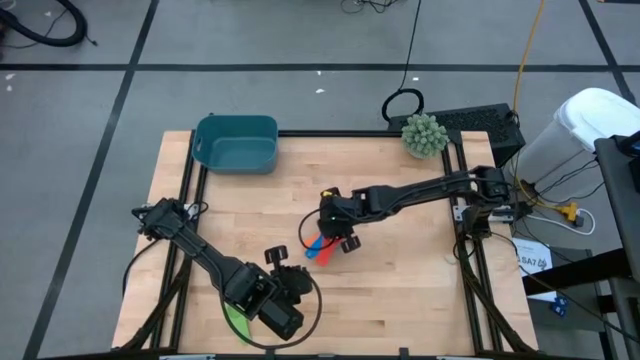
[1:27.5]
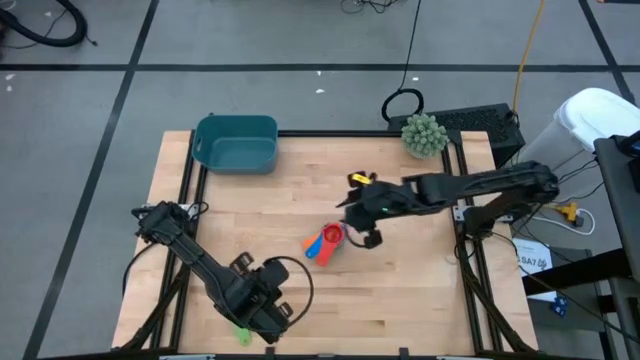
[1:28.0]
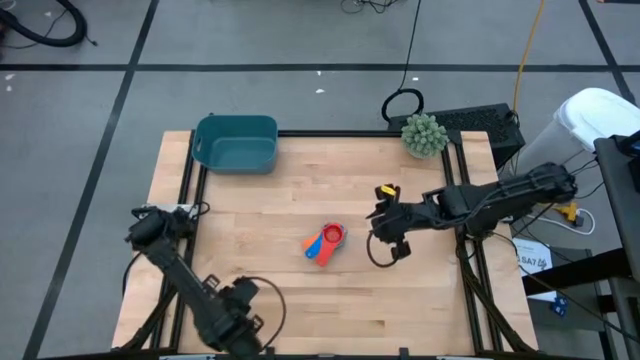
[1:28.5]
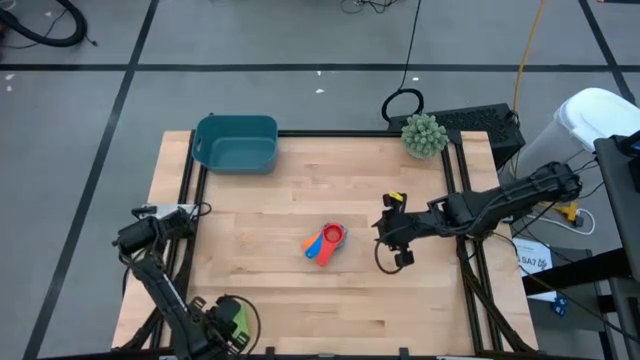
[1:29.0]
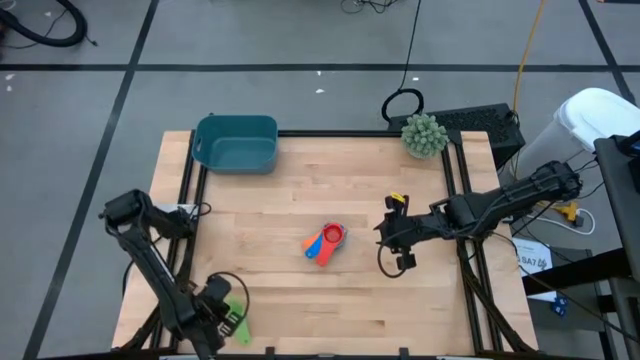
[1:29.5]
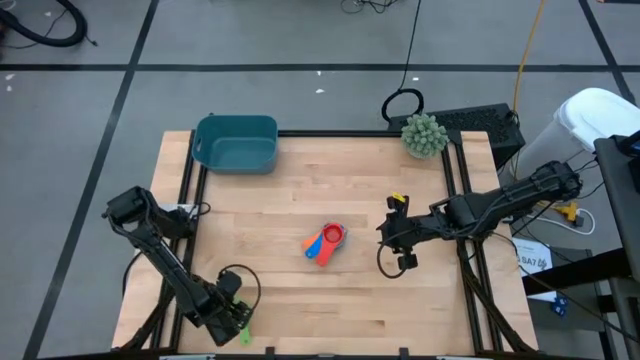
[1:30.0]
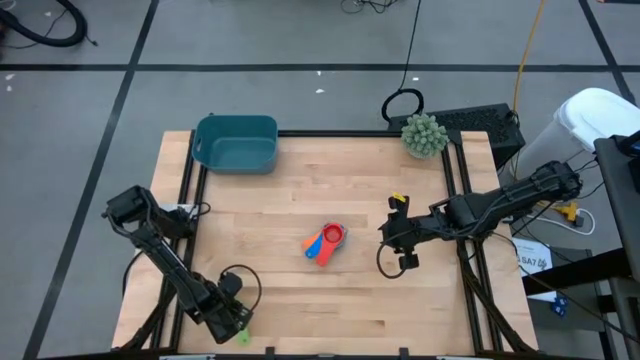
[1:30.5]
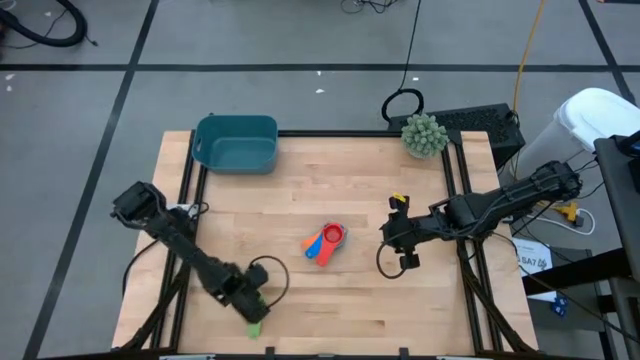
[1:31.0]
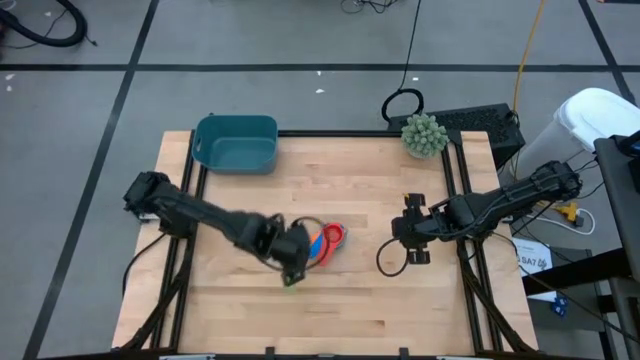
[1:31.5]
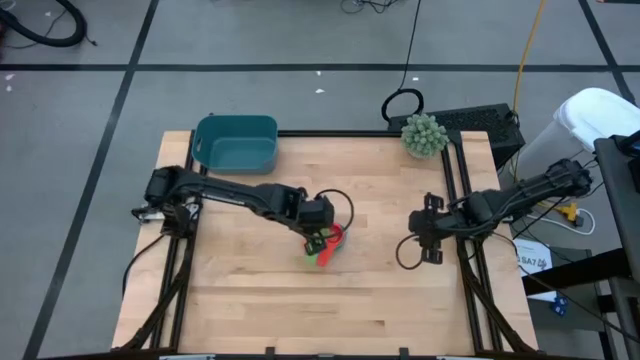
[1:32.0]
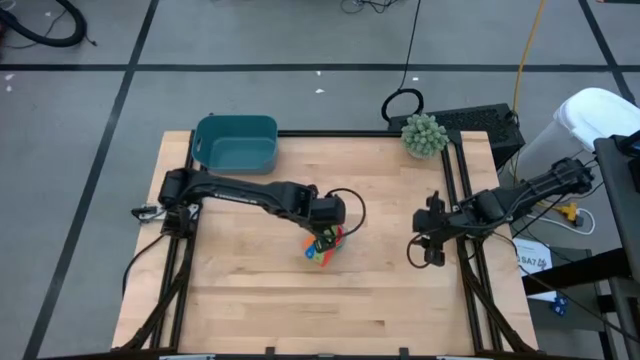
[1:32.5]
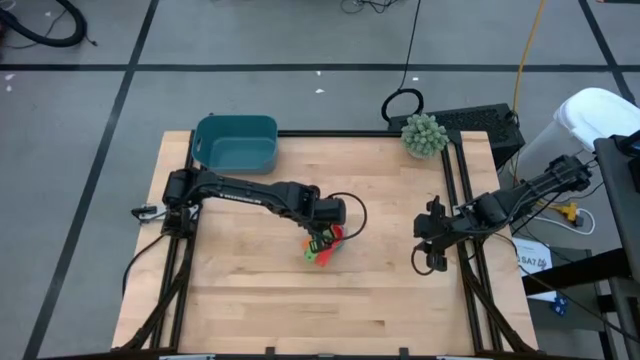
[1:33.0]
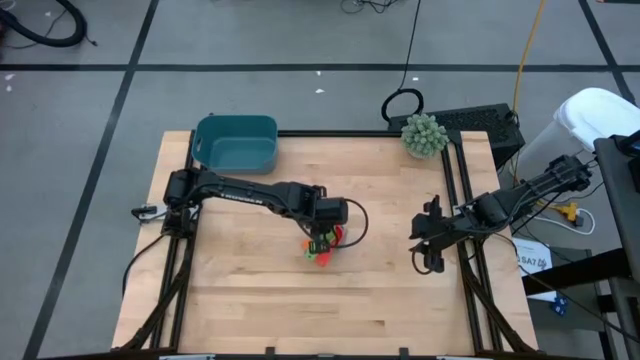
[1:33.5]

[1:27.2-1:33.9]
Task: Nest measuring cups in basket
Stack the green measuring cup on top of the red measuring cup

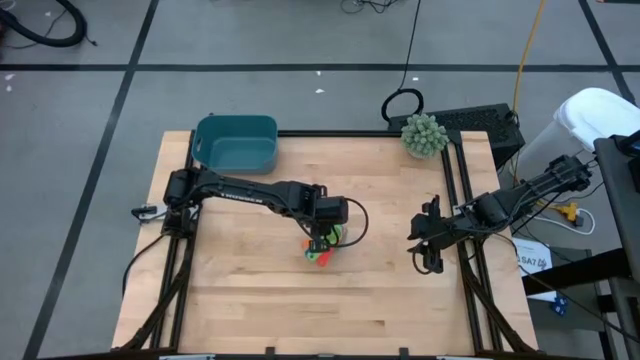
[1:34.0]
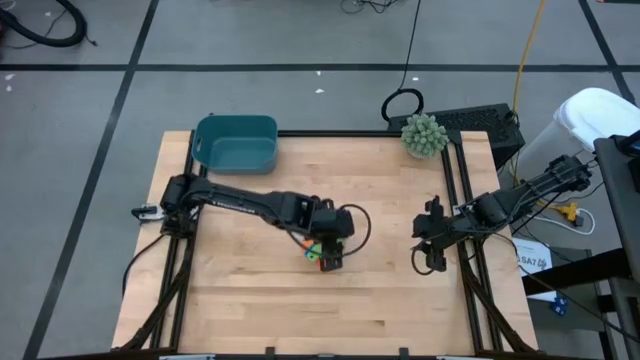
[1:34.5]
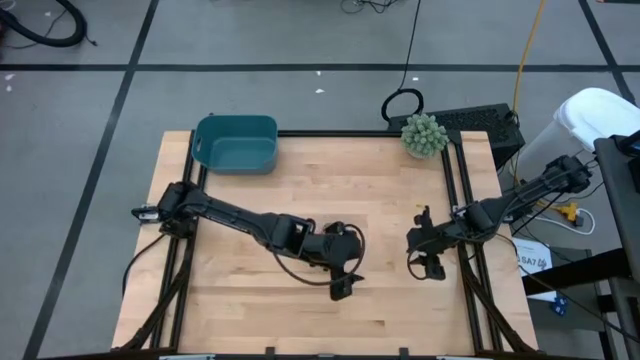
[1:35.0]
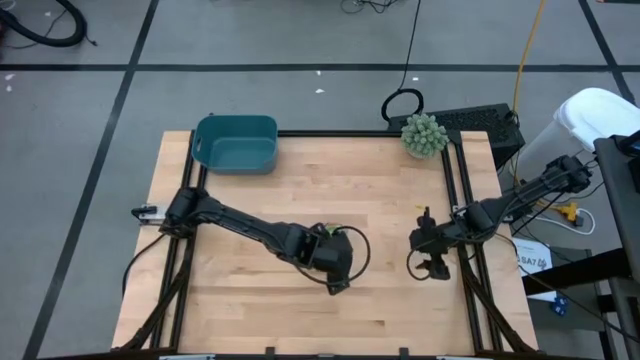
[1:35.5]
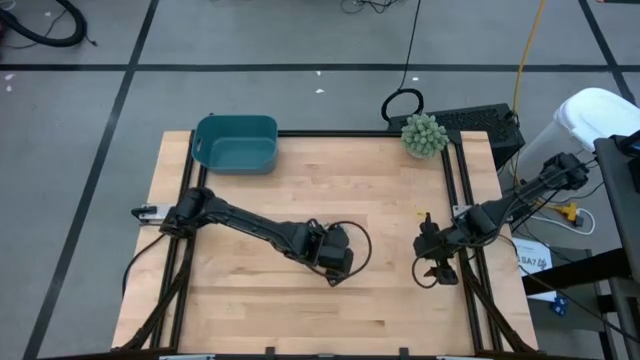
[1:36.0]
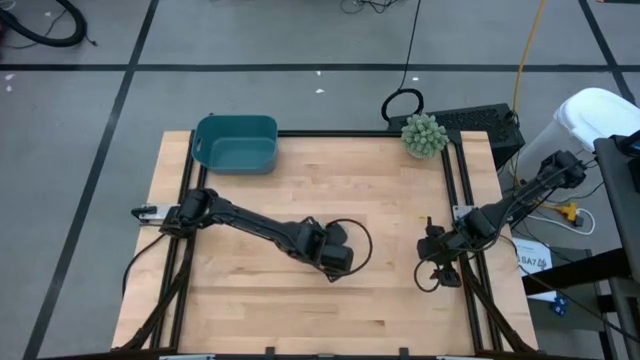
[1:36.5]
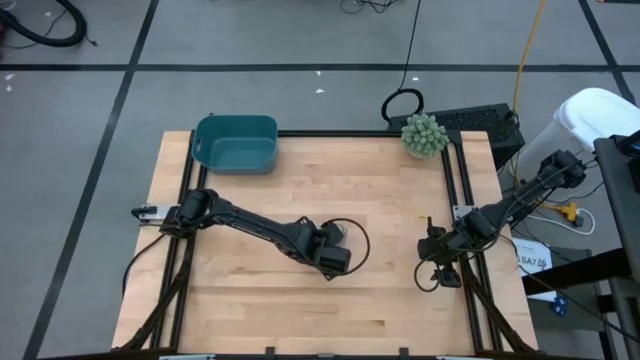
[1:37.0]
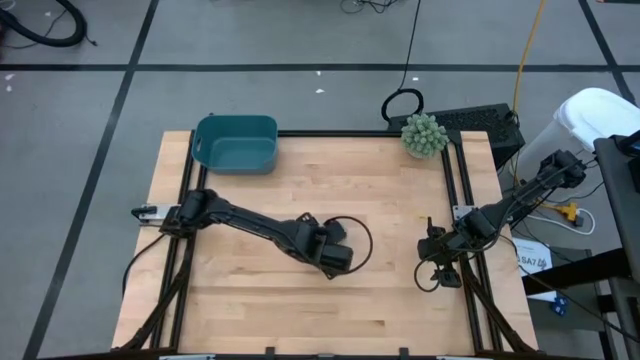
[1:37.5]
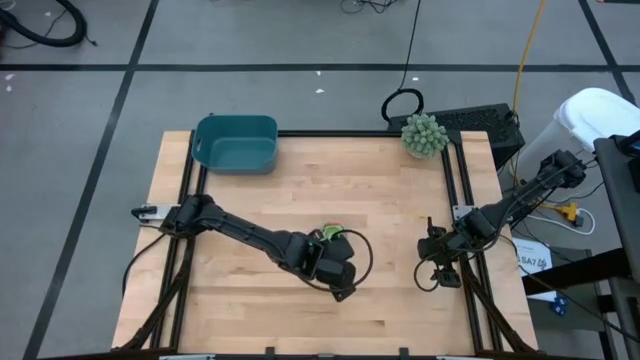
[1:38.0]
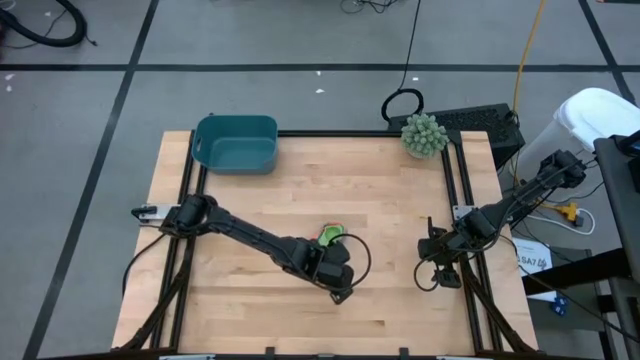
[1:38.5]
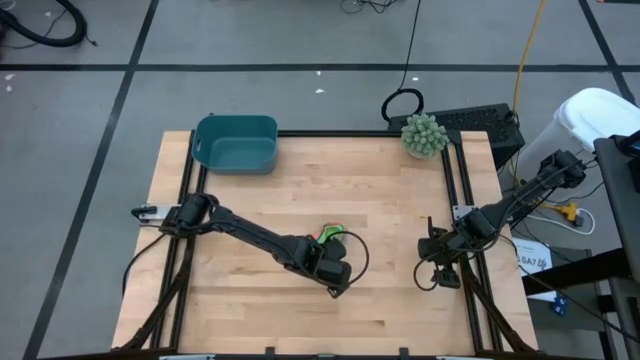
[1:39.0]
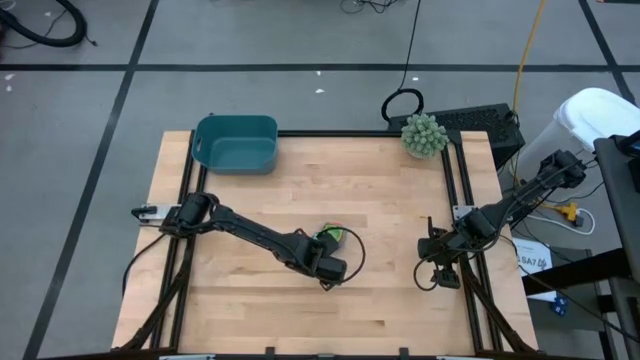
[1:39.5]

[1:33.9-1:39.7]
Adjust the stacked measuring cups

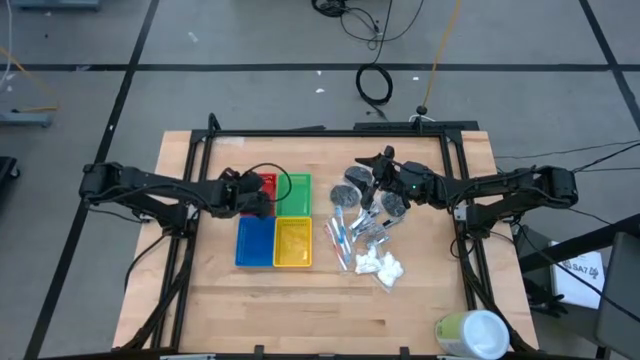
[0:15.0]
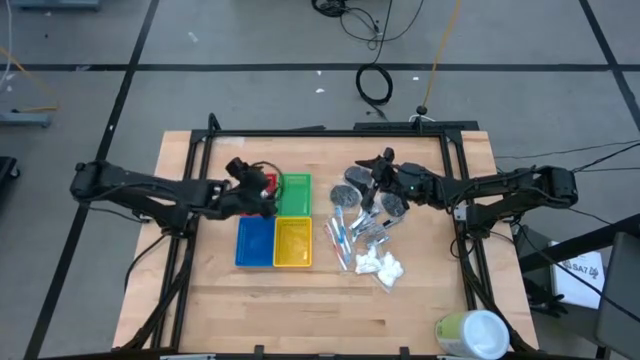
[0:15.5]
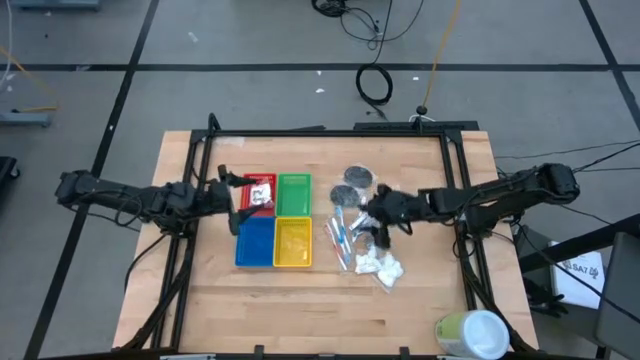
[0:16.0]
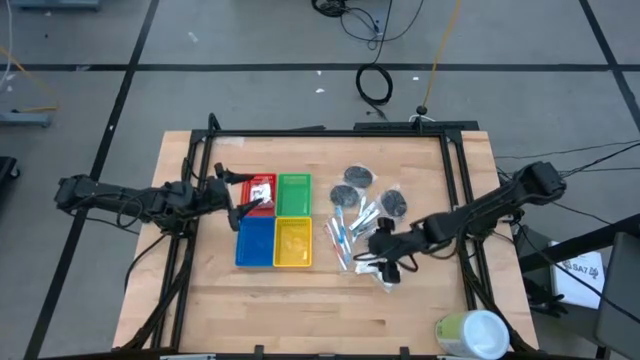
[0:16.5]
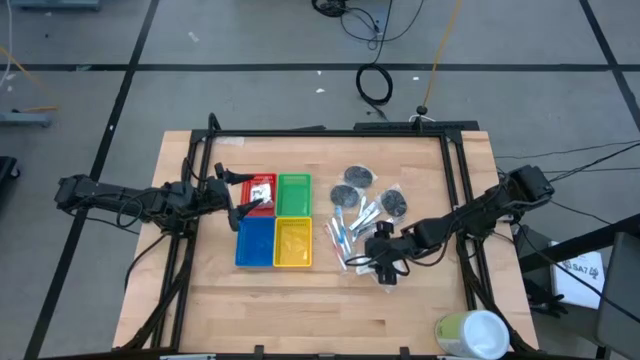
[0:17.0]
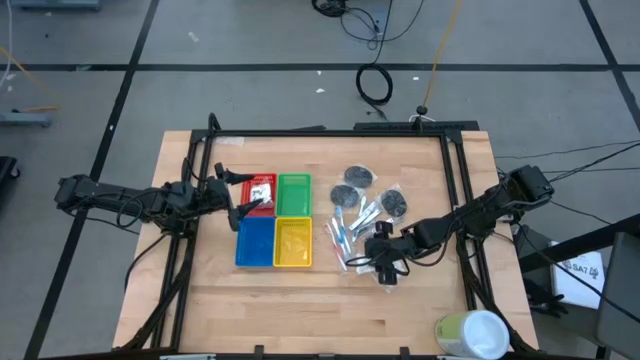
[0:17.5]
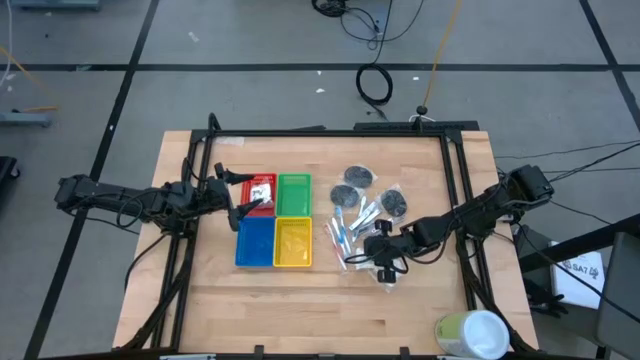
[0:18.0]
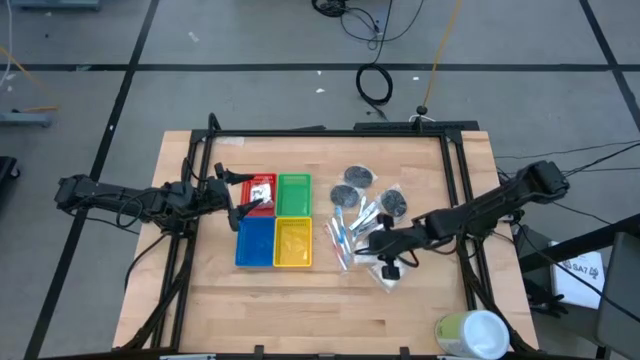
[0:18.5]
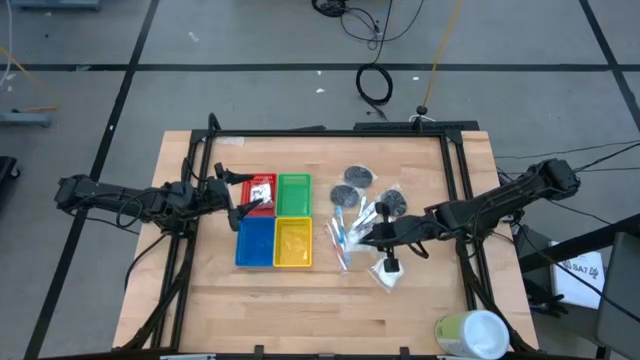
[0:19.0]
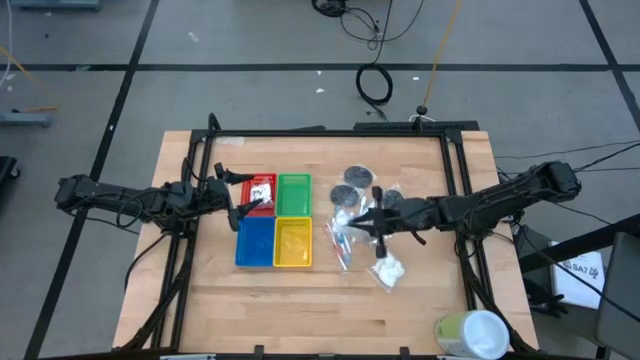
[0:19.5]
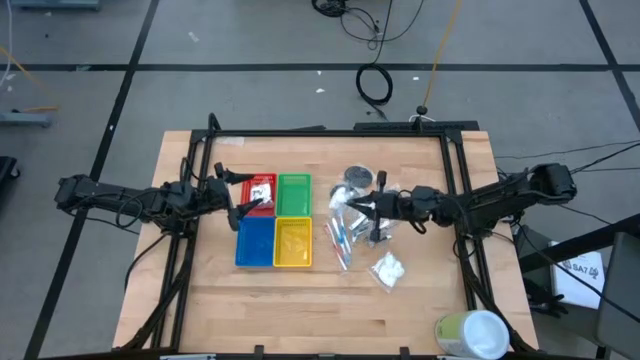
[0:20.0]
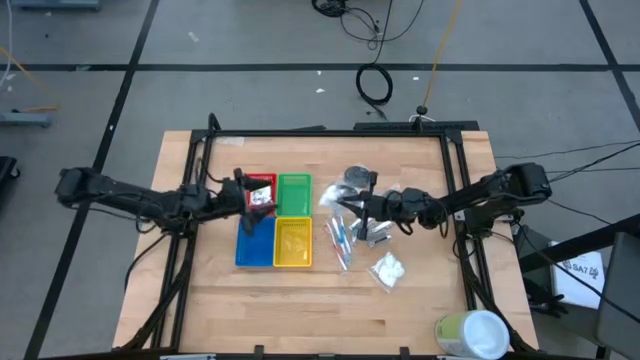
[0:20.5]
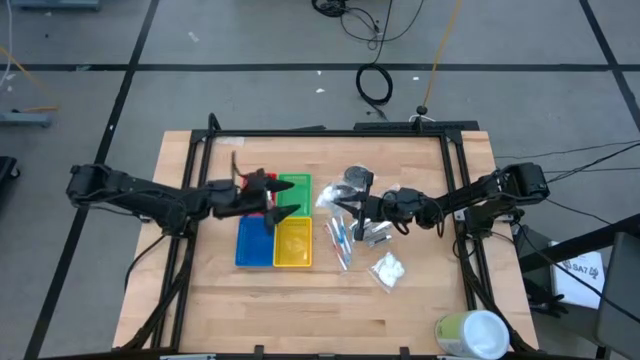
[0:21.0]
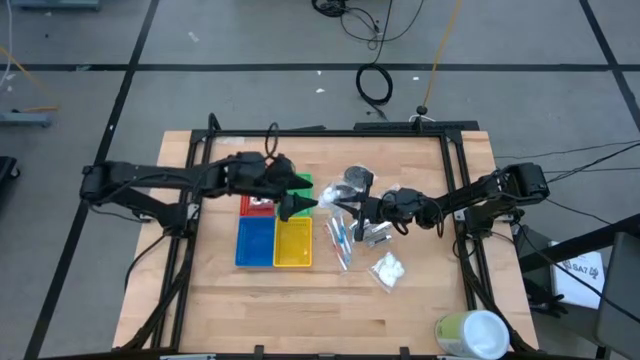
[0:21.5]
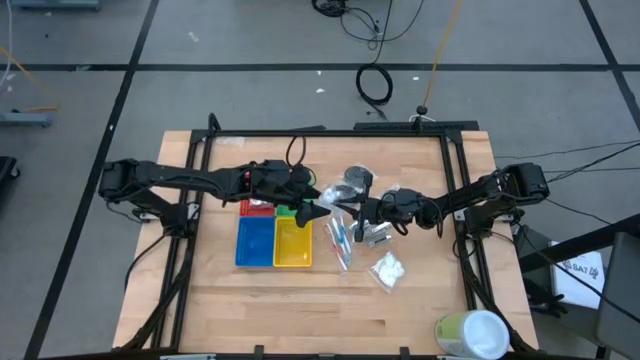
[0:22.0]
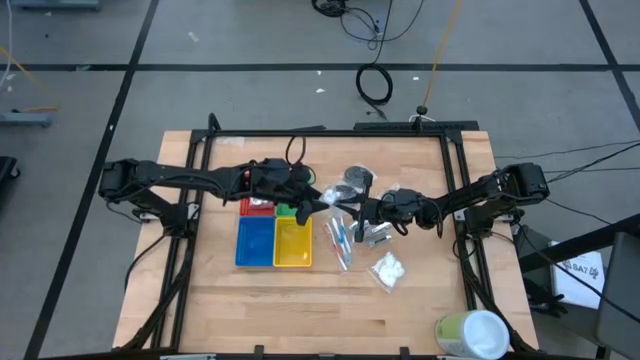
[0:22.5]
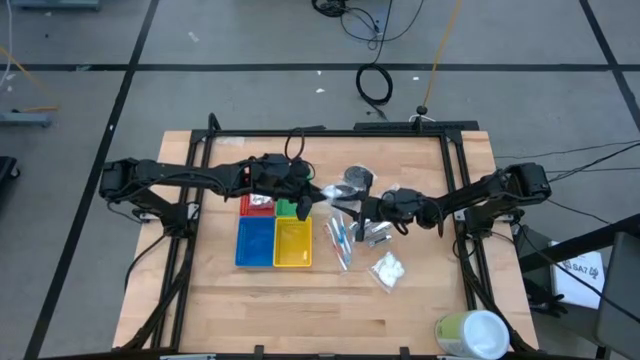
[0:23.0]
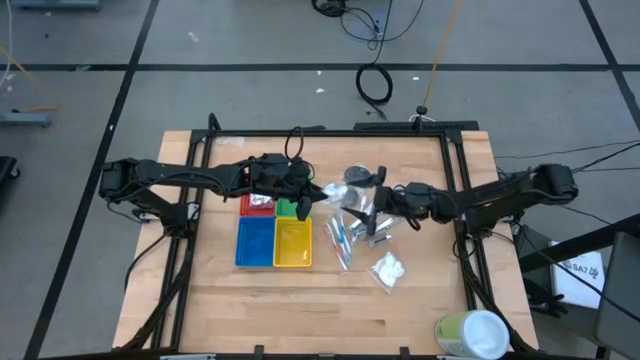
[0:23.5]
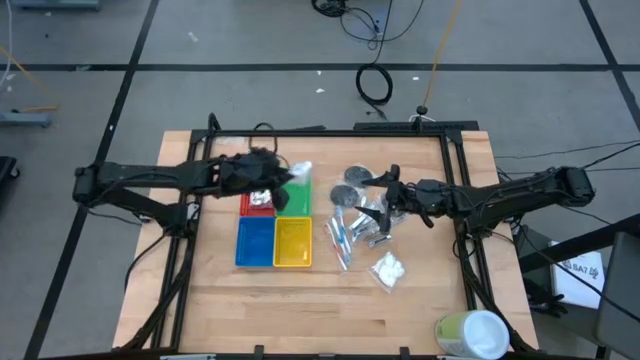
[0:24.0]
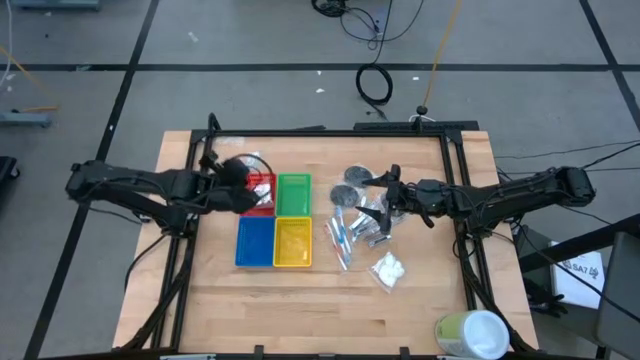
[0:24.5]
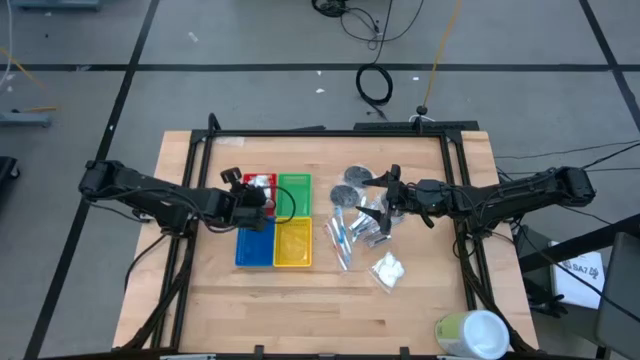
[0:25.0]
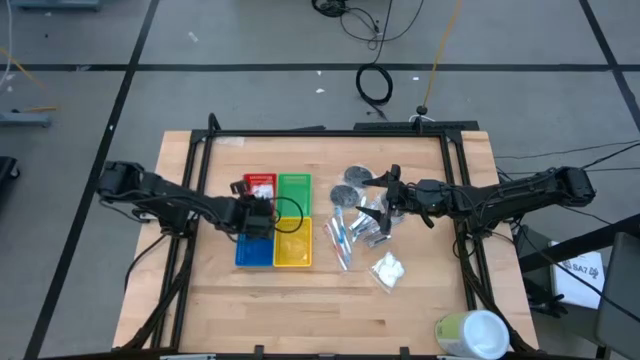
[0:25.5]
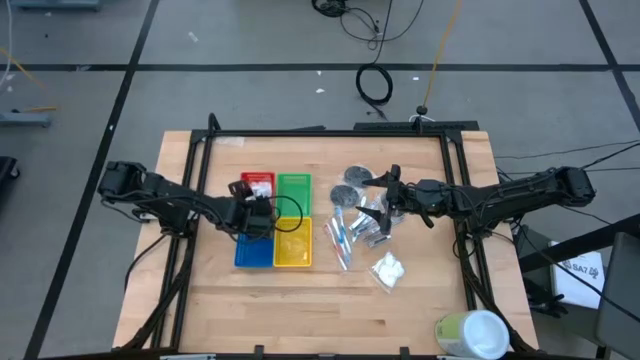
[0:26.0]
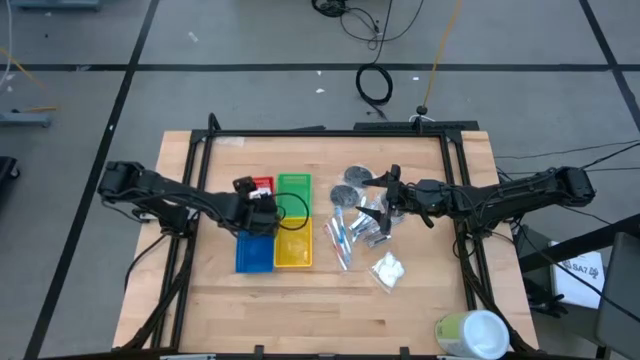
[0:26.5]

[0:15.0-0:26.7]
Task: Pick & Place Travel size toiletries
Put the white cotton pack into the red bin
